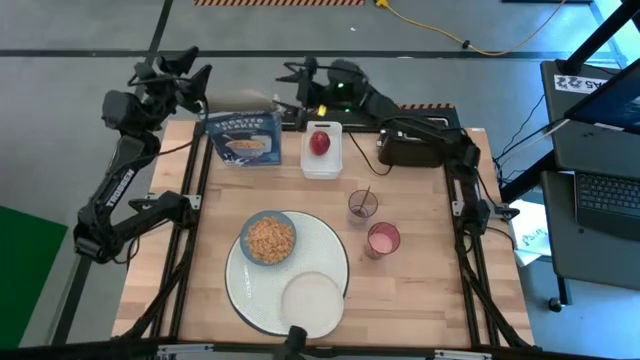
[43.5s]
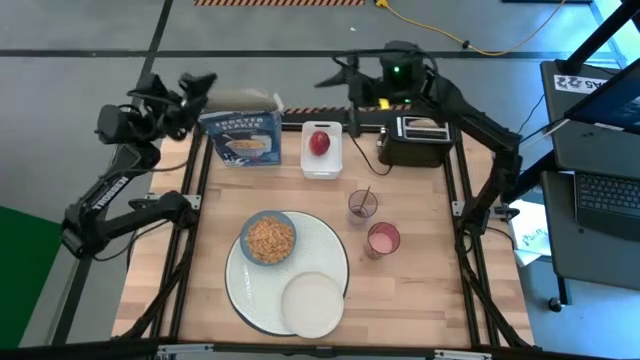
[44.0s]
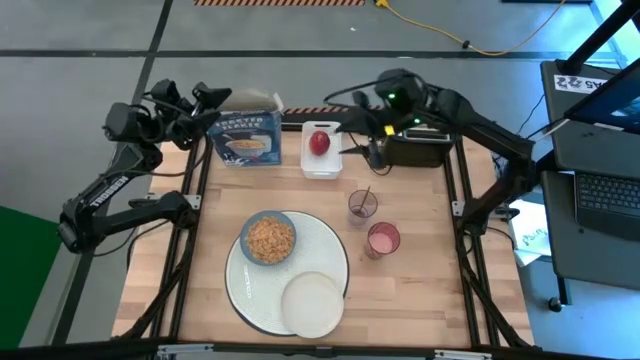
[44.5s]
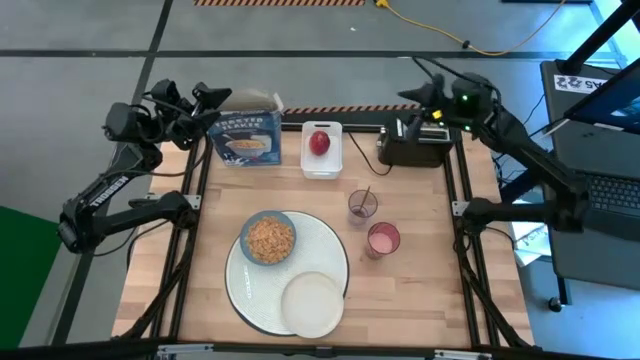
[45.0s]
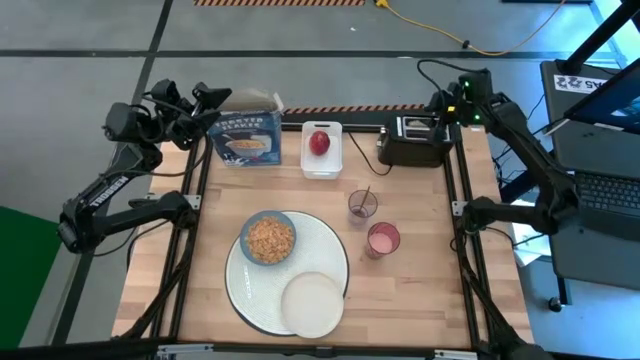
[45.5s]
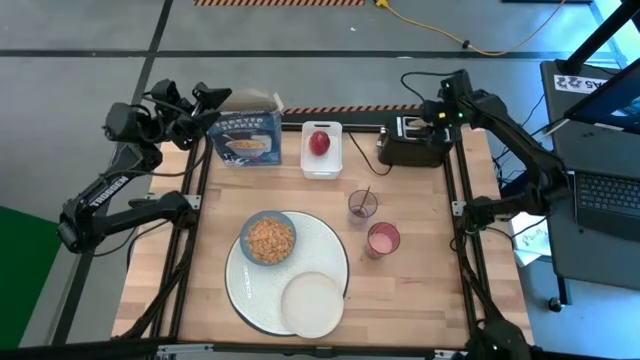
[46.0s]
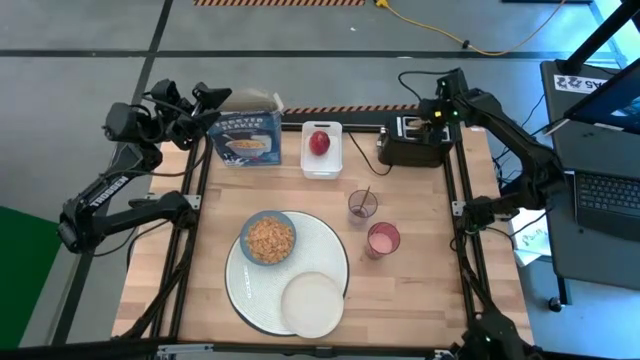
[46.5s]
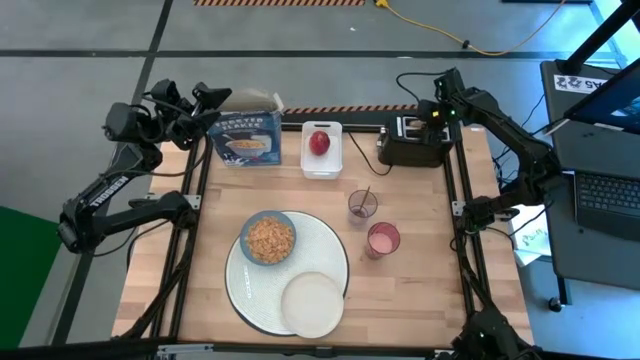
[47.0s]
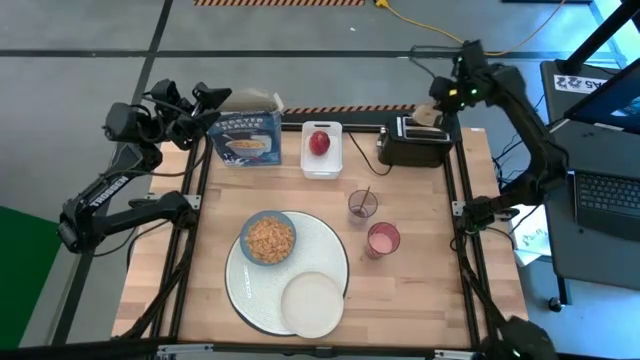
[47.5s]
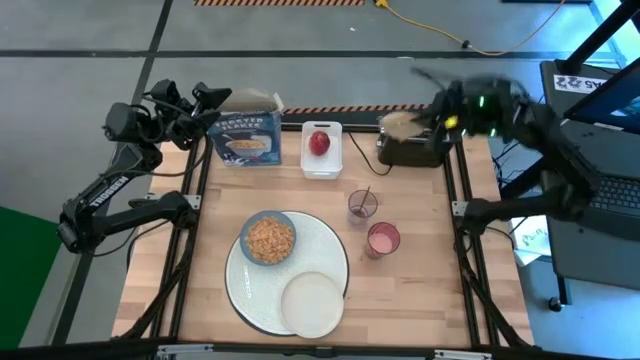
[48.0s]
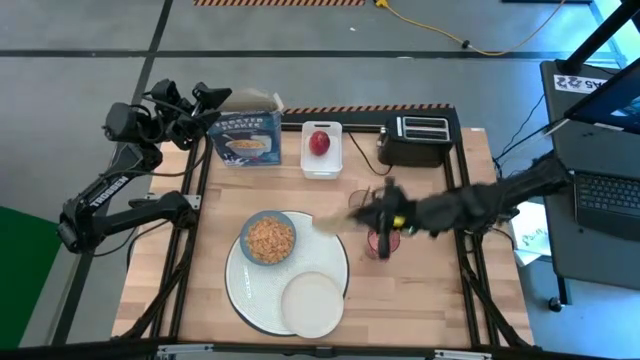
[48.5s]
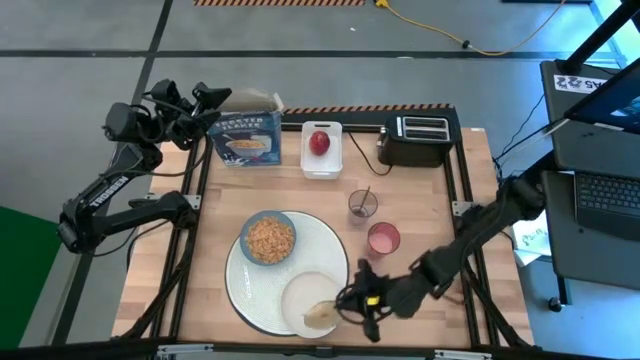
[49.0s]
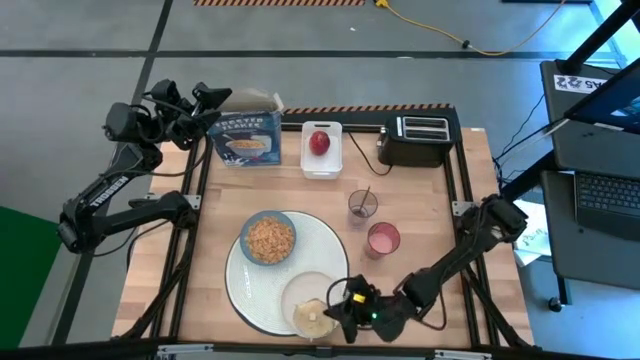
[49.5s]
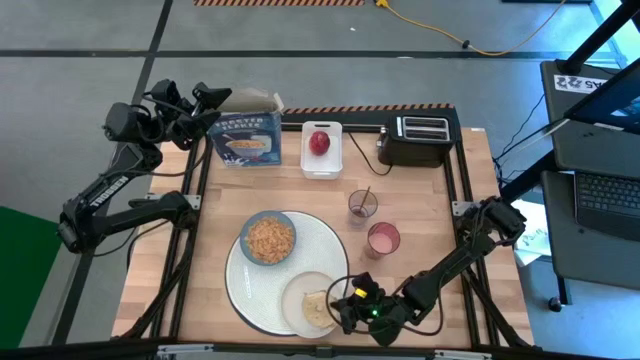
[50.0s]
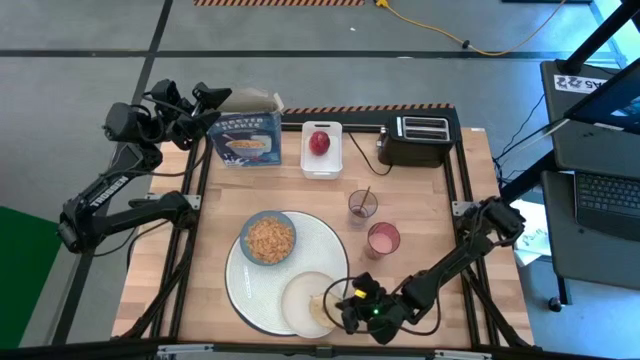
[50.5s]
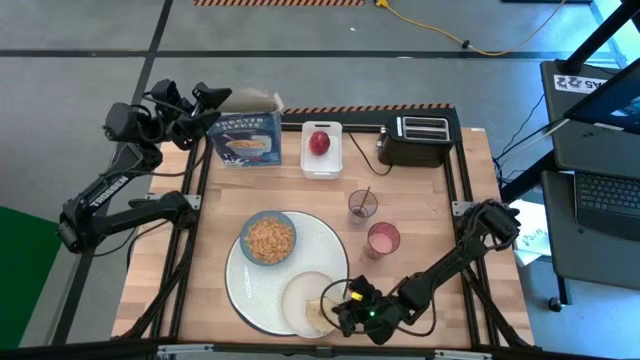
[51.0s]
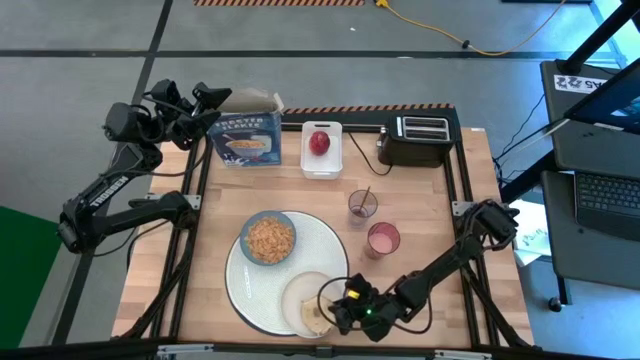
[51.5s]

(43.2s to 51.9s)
Task: Arrange a breakfast setting
Put the brown bagel into the white plate

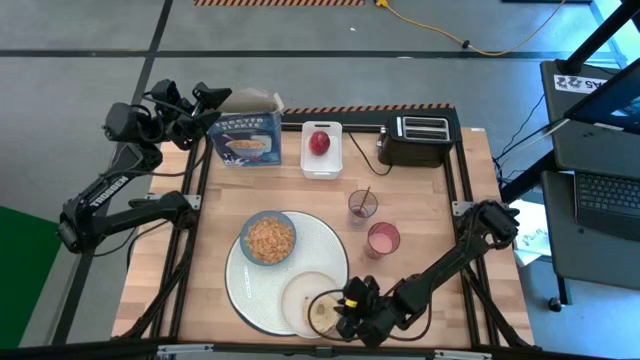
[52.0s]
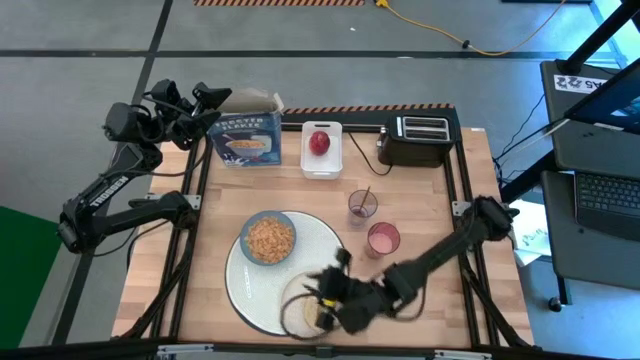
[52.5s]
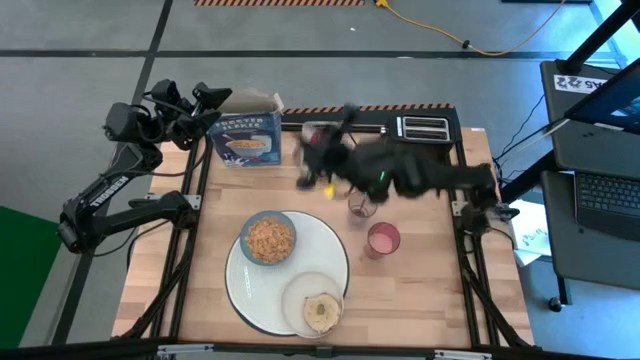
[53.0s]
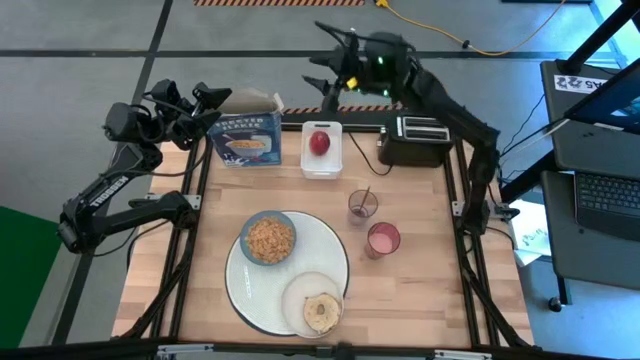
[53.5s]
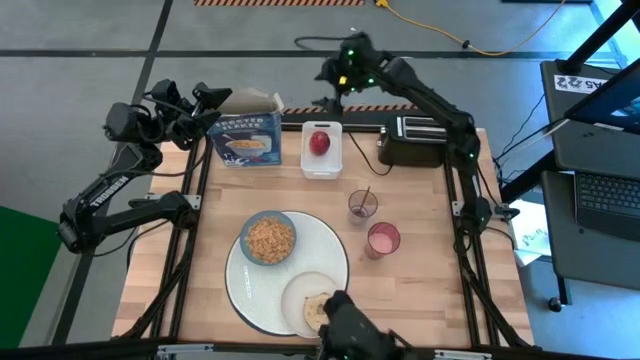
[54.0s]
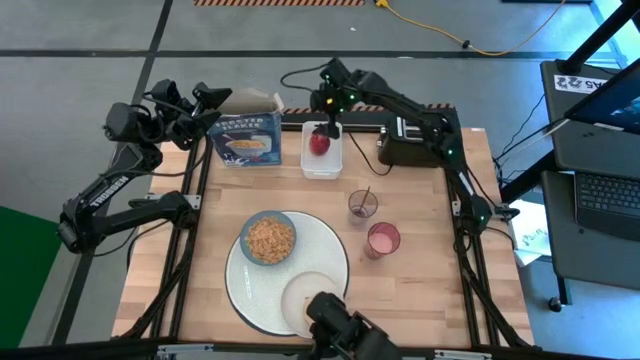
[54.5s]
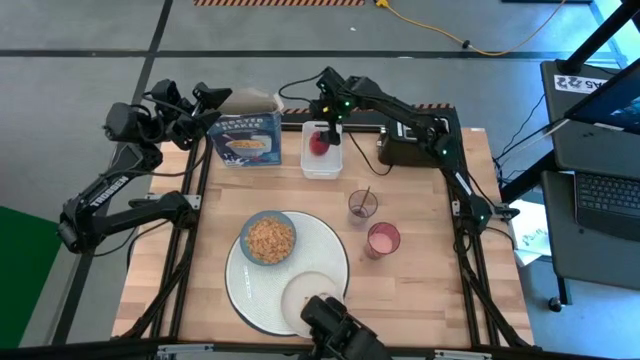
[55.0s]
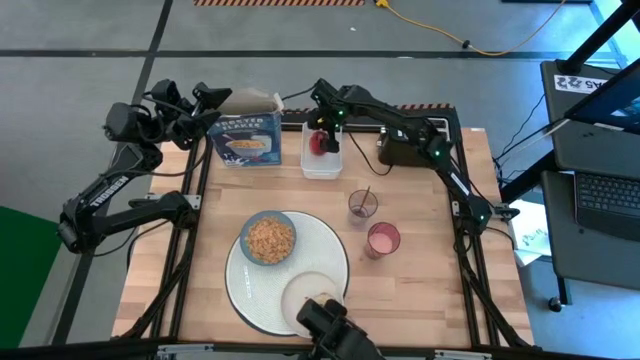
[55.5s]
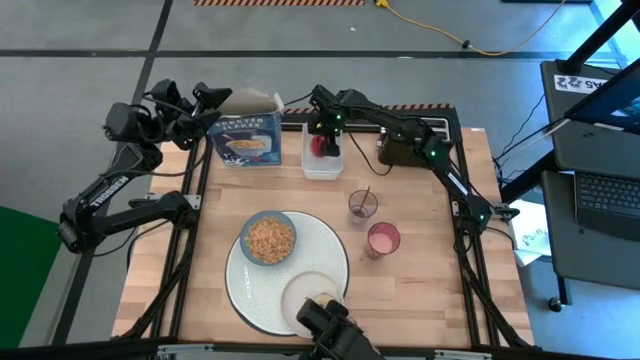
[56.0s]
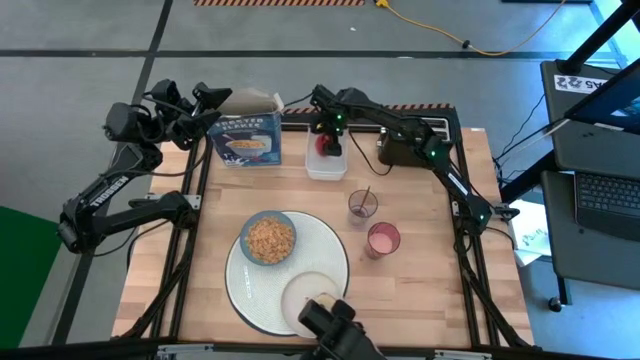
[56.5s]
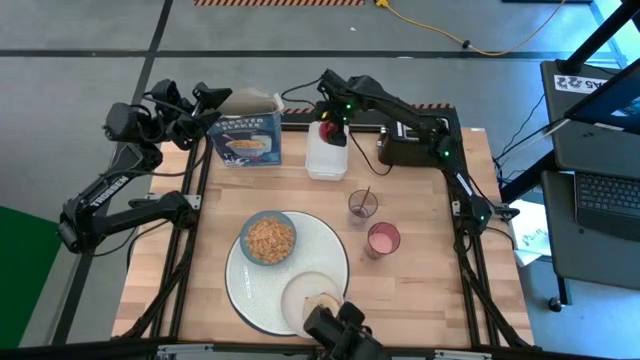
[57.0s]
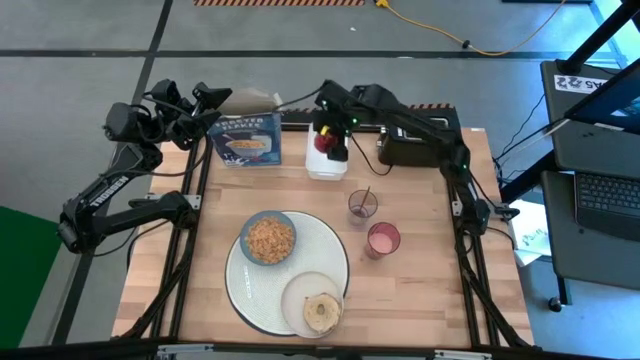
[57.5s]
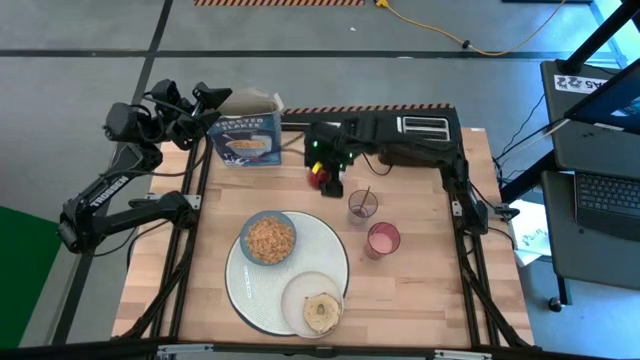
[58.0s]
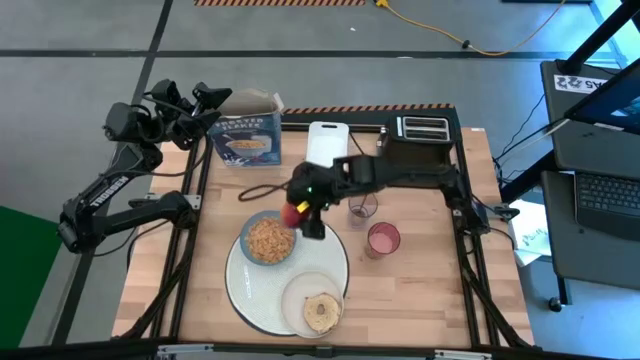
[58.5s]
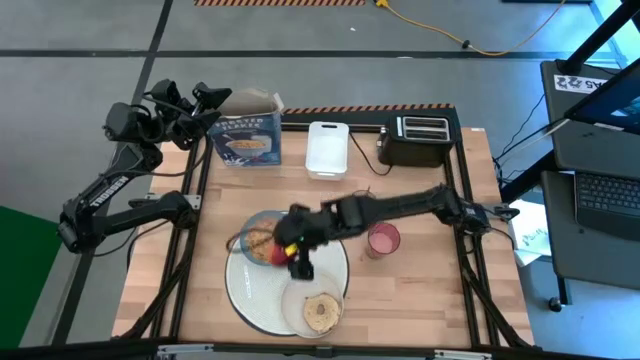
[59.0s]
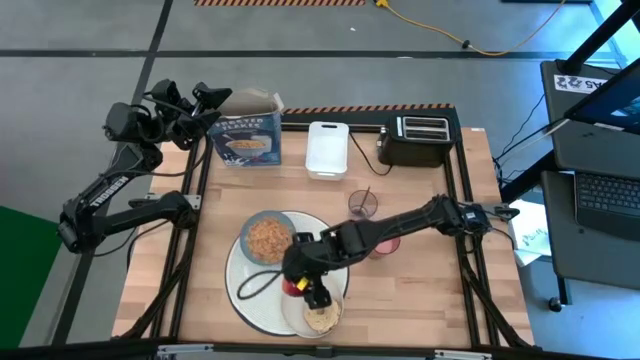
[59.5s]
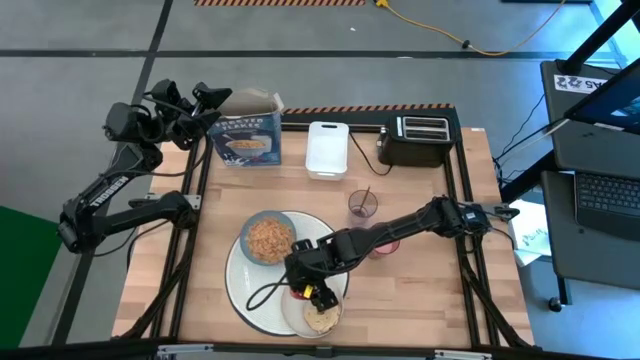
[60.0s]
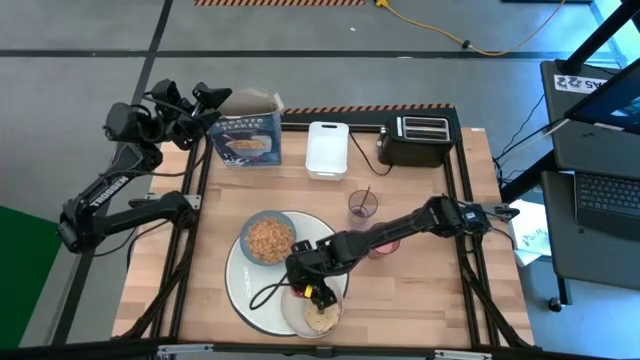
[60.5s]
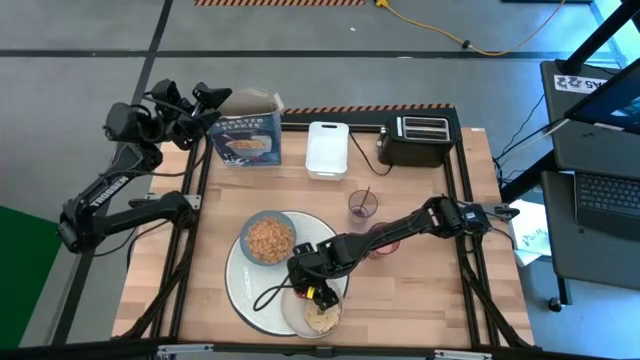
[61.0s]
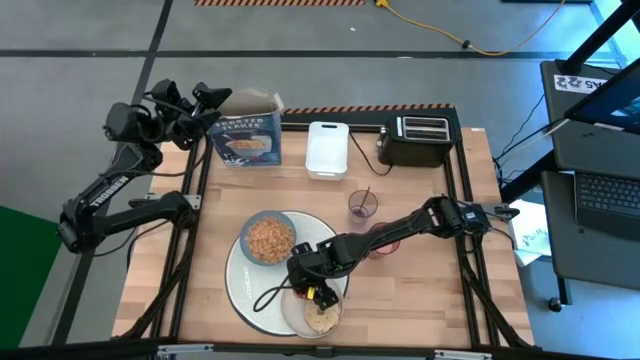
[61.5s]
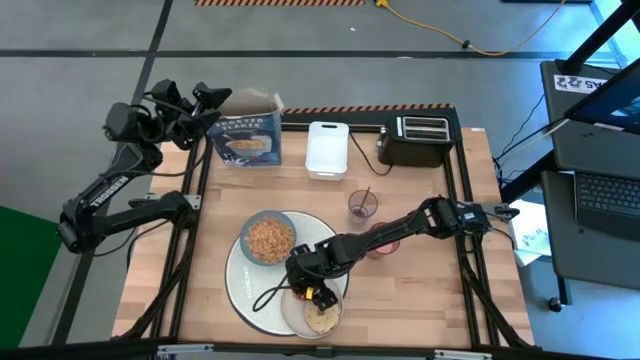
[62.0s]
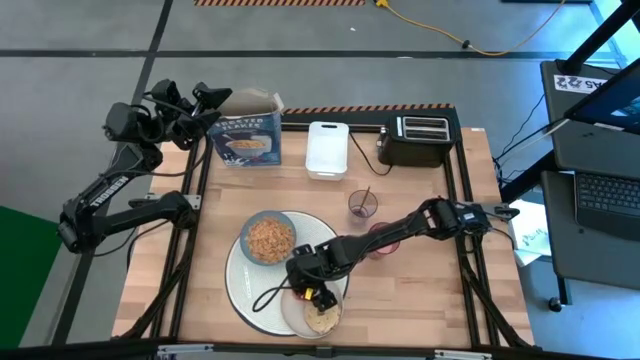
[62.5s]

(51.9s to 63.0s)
Put the red apple into the white plate

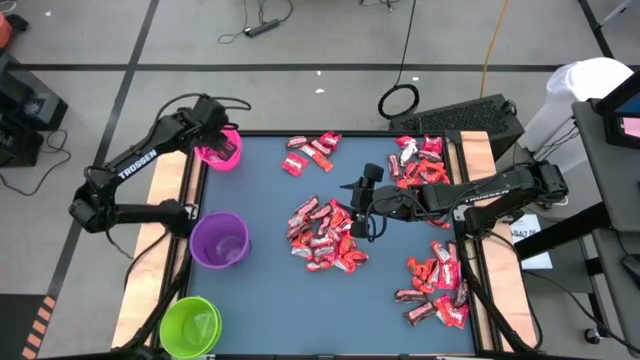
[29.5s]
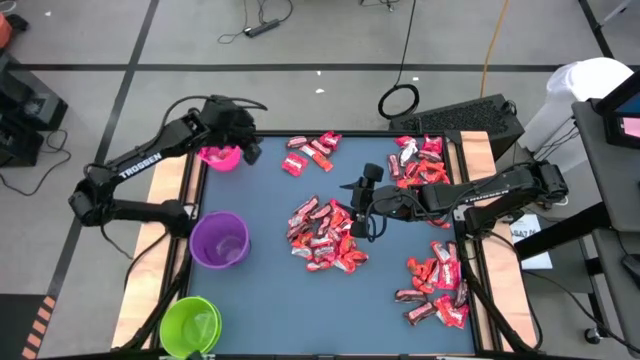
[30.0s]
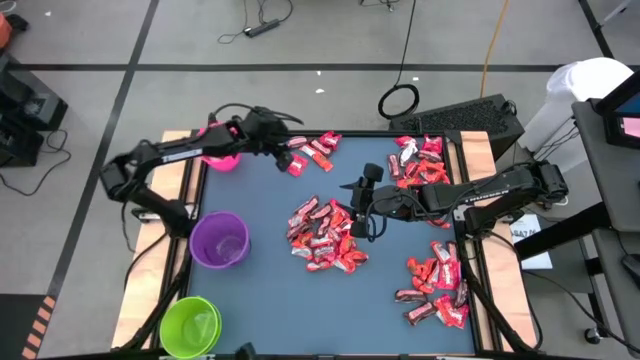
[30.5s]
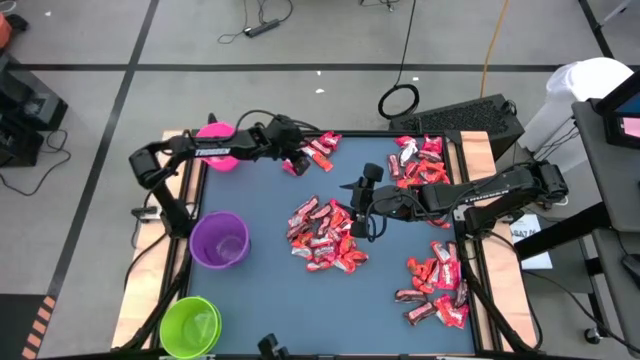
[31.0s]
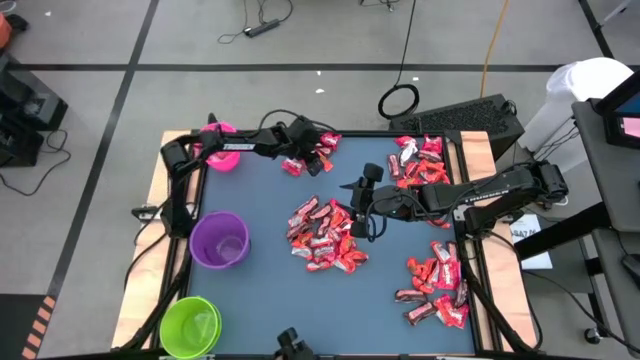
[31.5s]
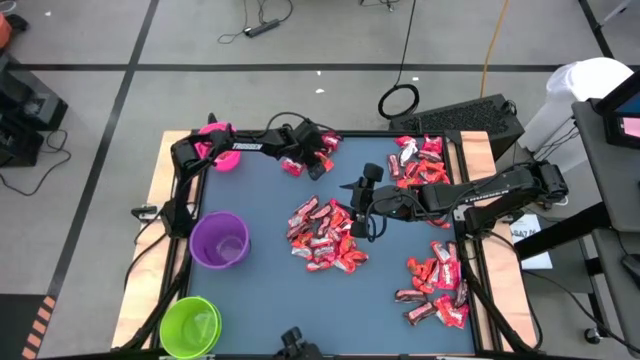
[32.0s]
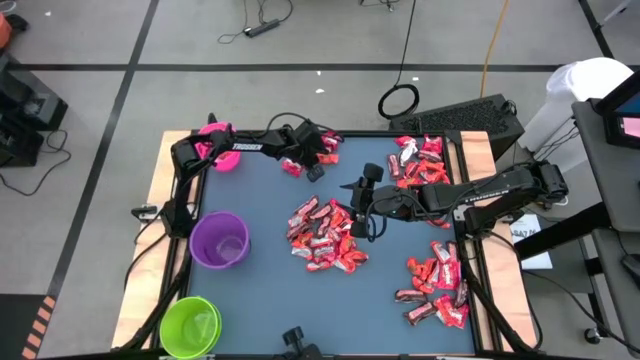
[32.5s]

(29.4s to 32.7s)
Task: Organize candy in baskets
Put the orange chocolate into the pink bucket
